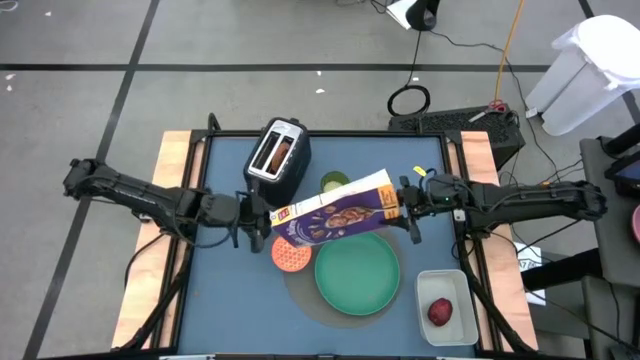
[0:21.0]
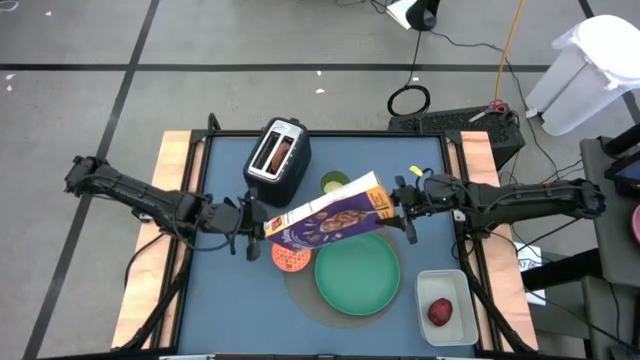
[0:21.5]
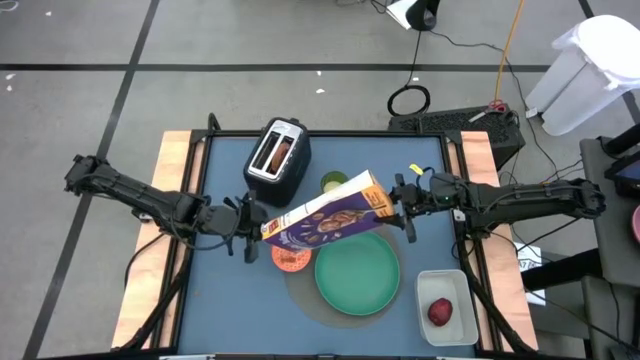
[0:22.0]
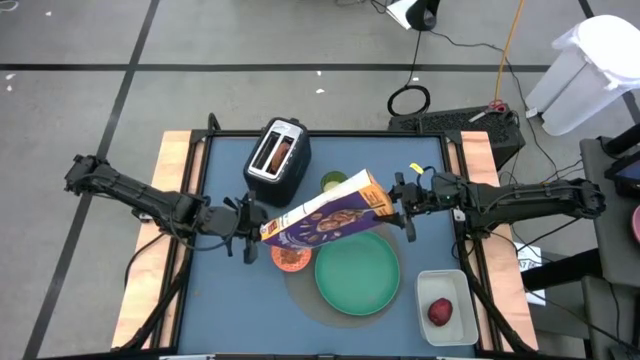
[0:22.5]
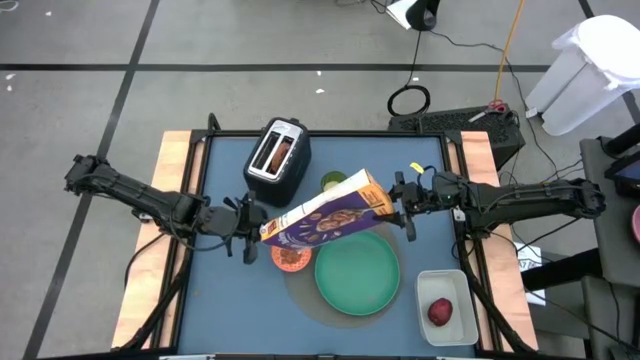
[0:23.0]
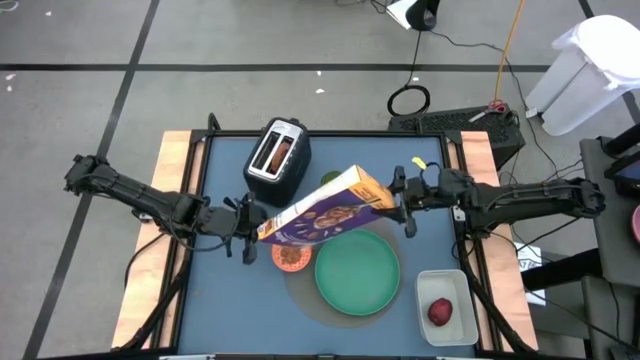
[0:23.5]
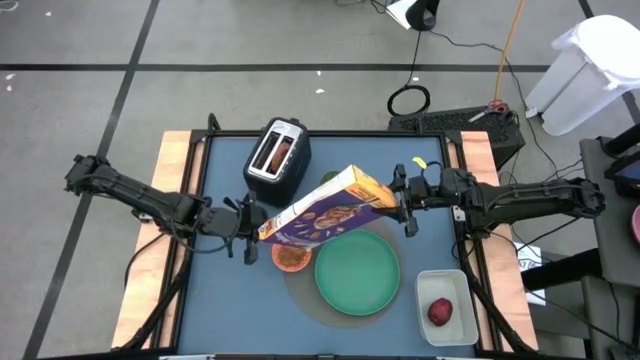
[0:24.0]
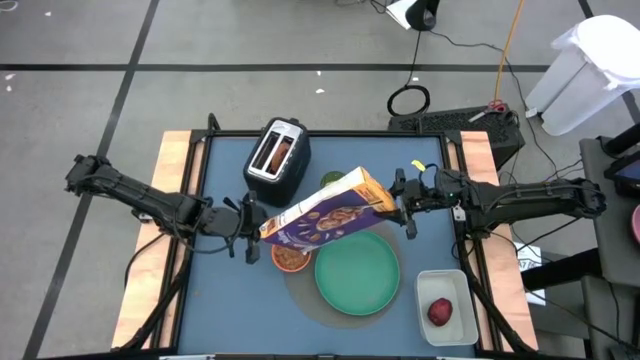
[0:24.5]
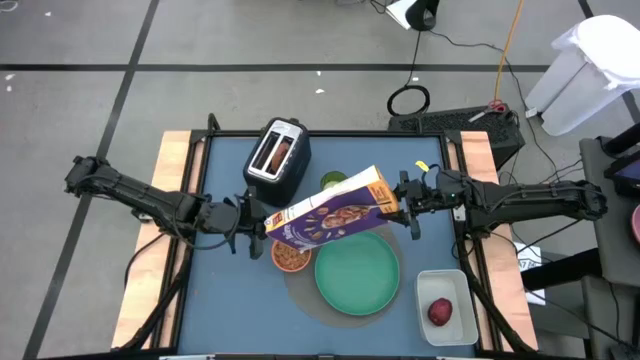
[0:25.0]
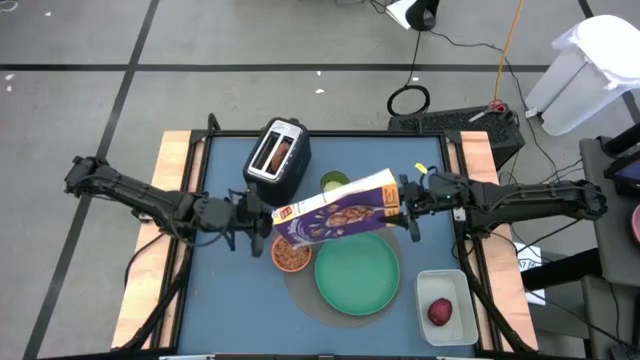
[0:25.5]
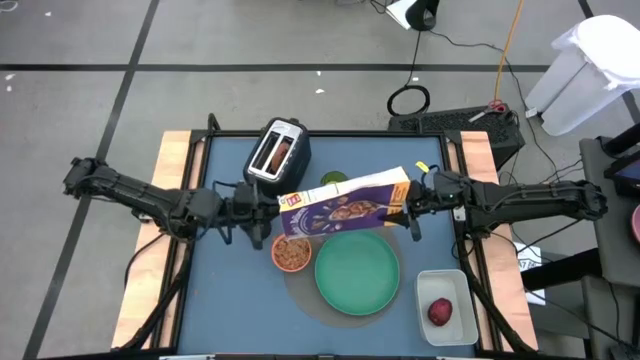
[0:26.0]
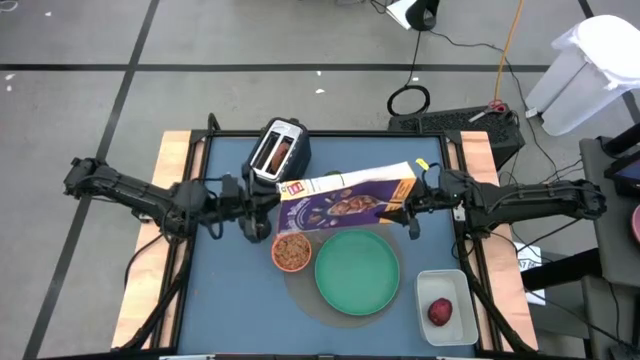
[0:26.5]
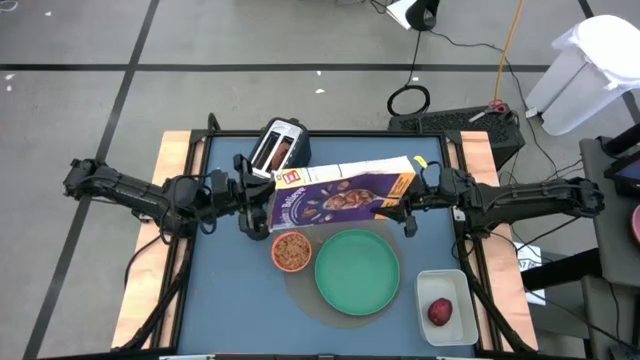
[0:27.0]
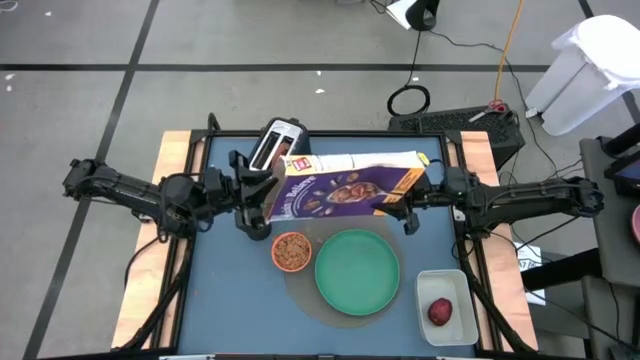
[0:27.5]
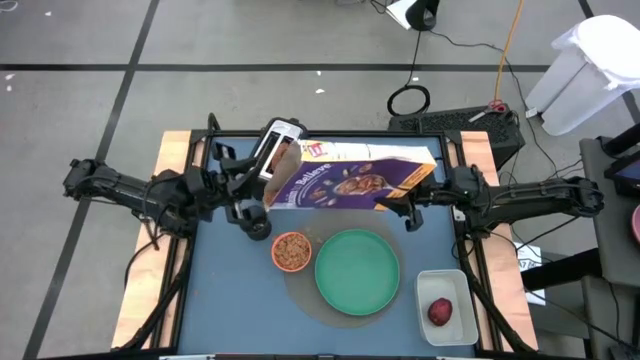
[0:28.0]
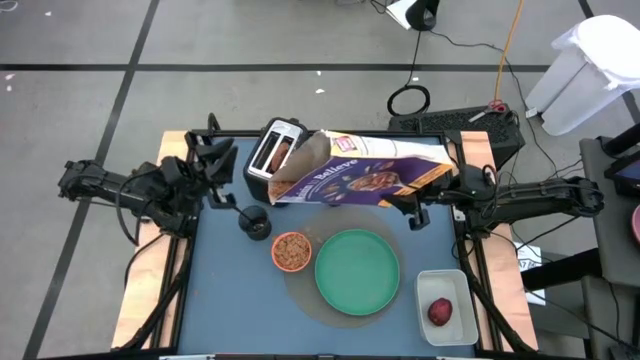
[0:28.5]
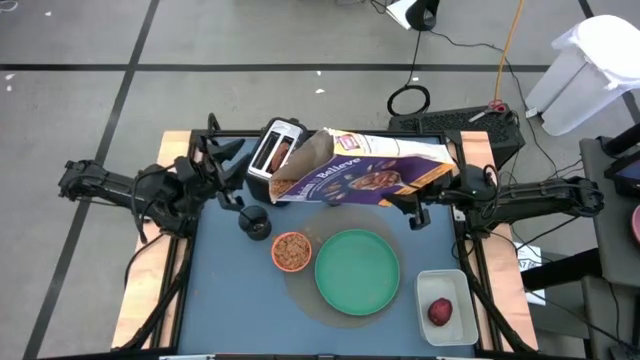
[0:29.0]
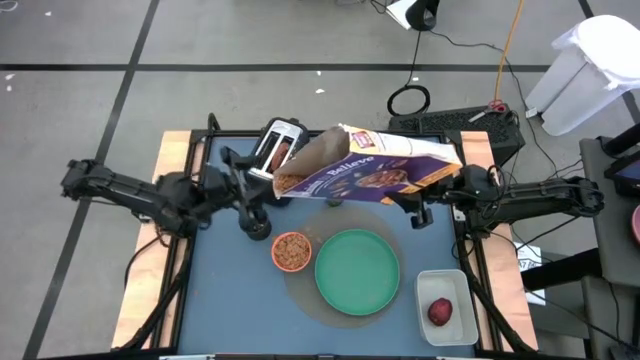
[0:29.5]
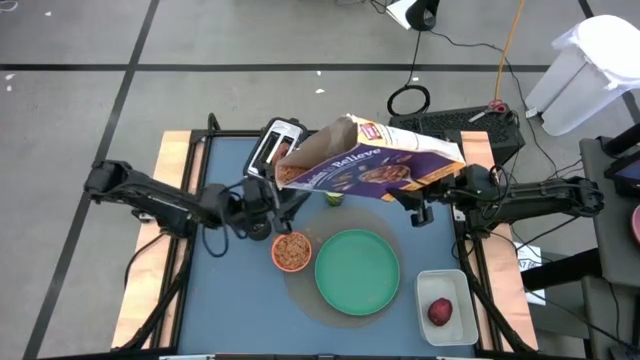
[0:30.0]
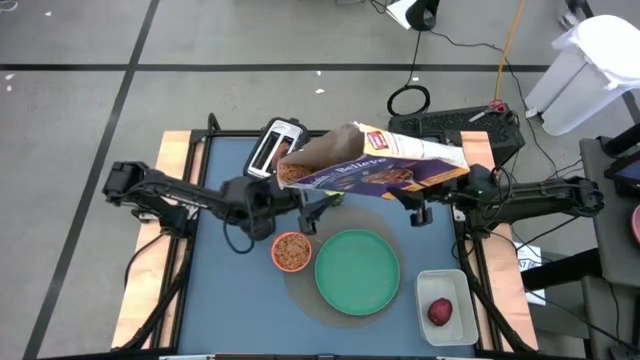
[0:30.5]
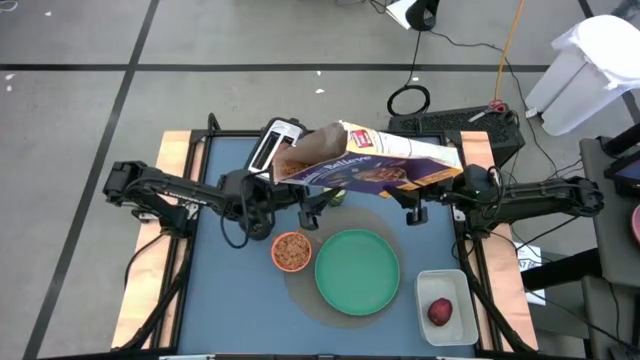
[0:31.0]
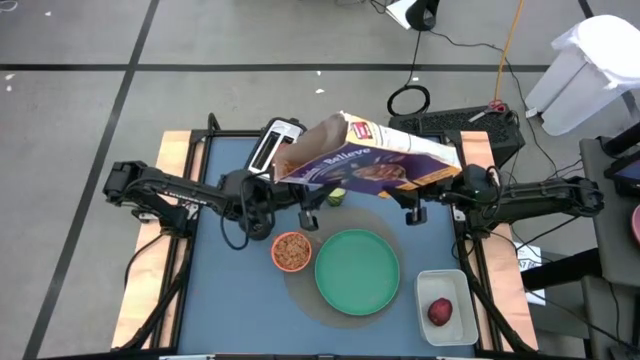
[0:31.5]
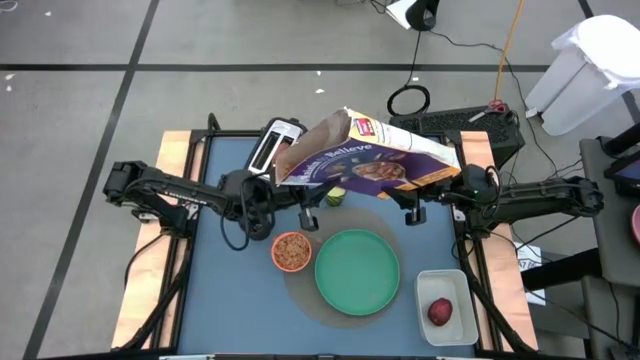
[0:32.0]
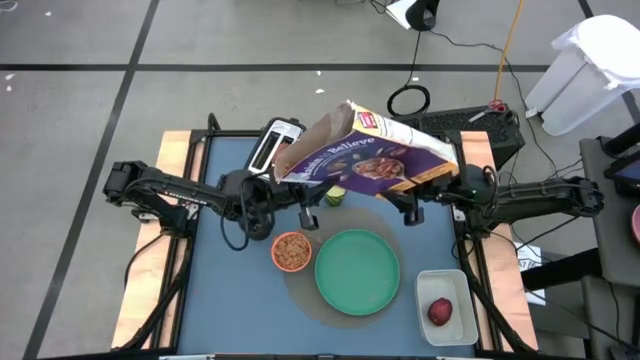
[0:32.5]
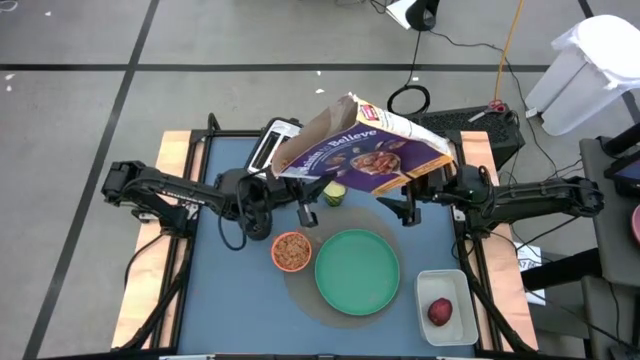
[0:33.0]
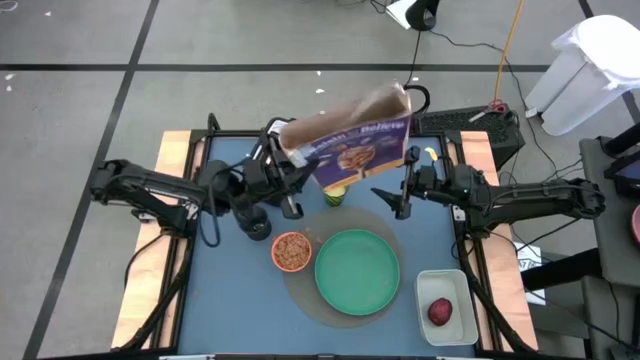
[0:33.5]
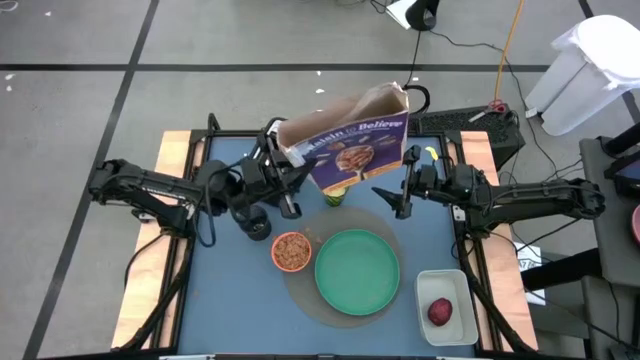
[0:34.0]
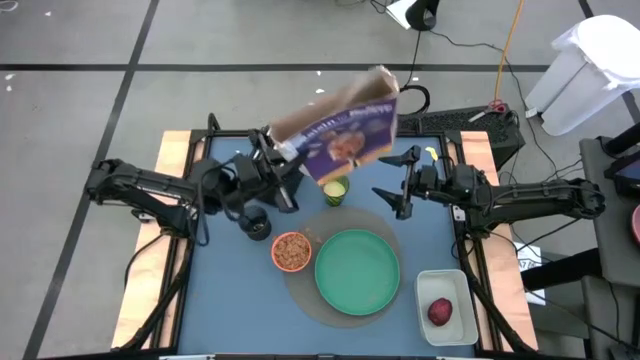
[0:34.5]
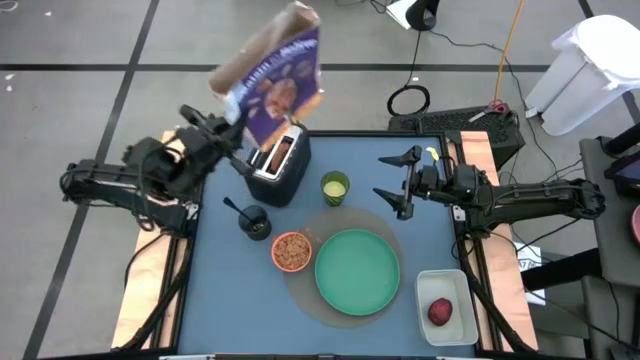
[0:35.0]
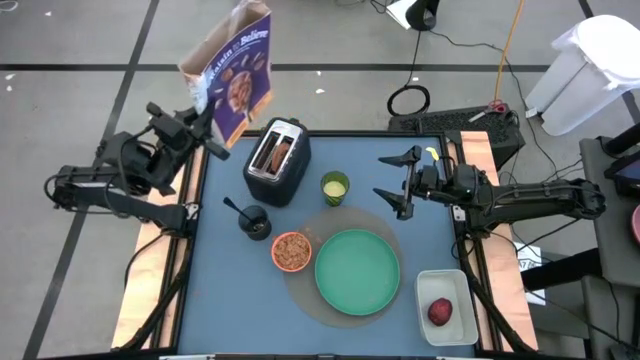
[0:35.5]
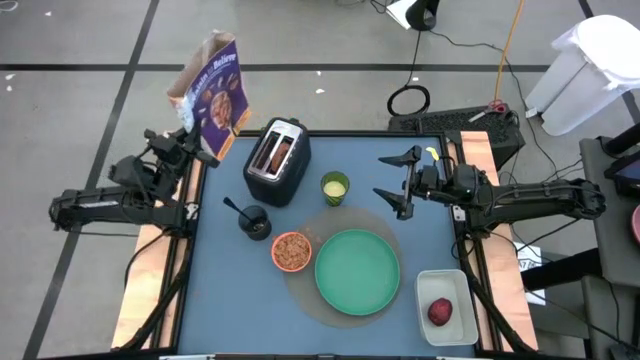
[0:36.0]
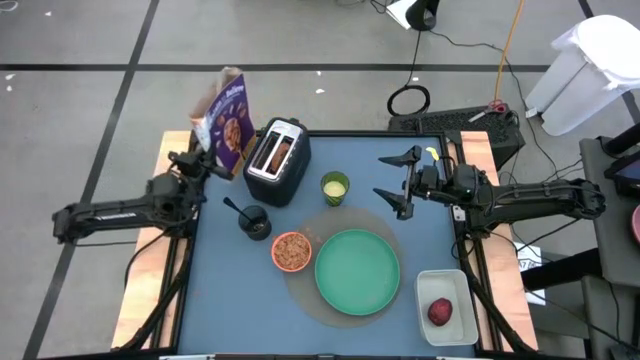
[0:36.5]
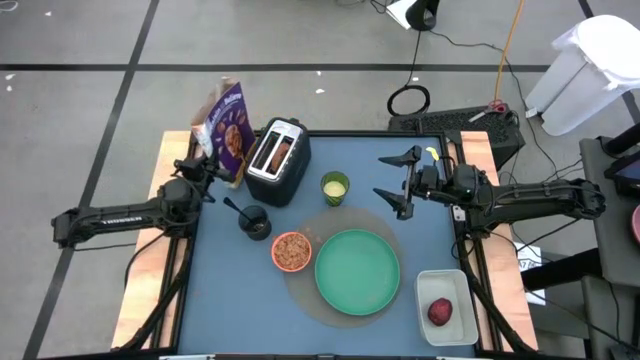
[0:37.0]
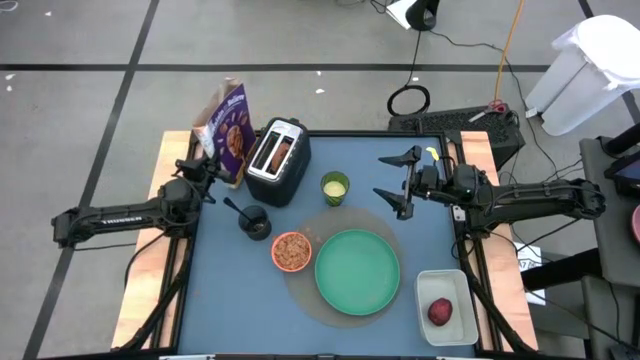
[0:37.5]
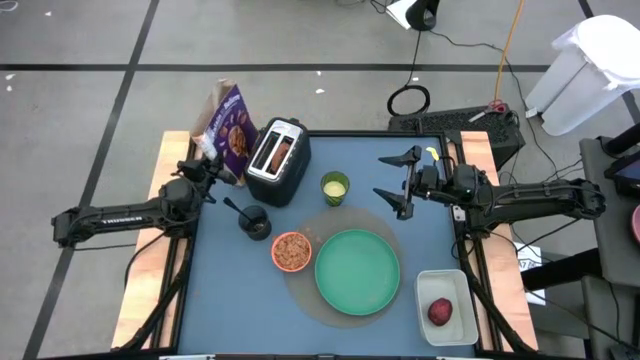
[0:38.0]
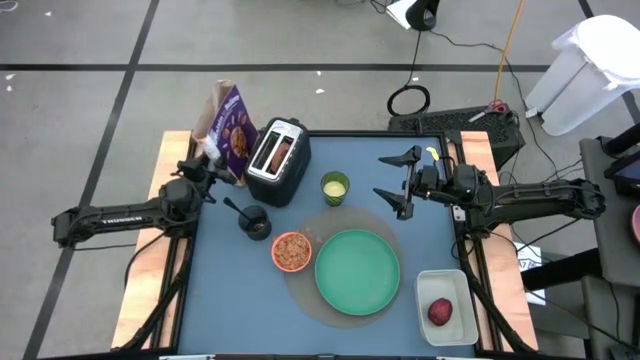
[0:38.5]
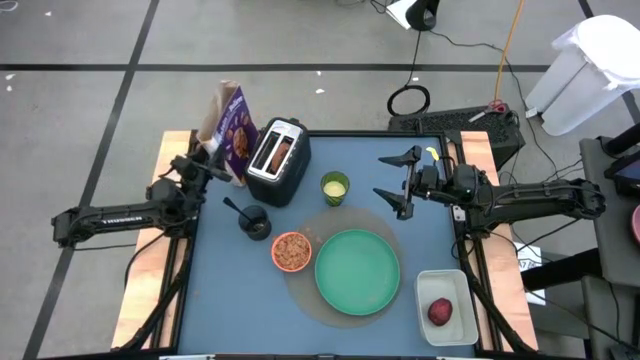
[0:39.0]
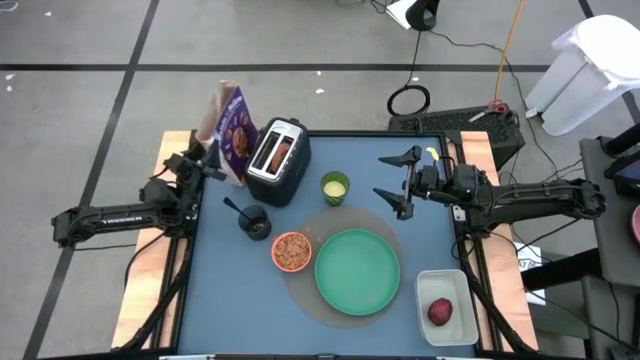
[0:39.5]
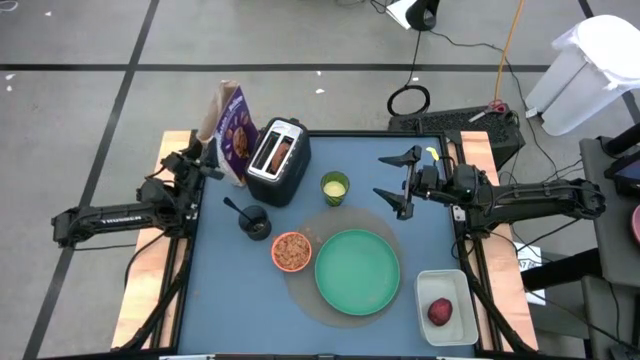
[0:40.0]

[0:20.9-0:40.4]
Task: Arrange a breakfast setting
Pour the cereal into the orange bowl
